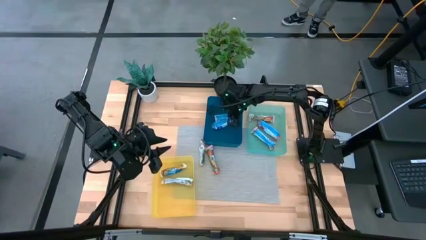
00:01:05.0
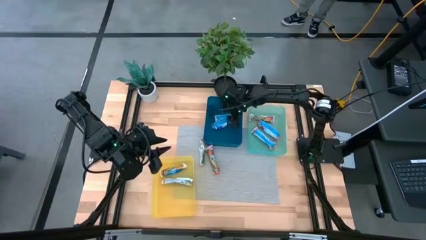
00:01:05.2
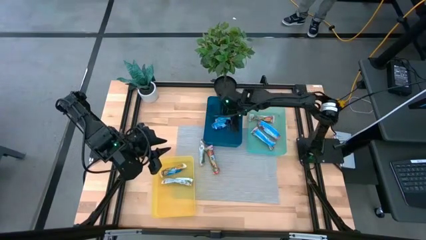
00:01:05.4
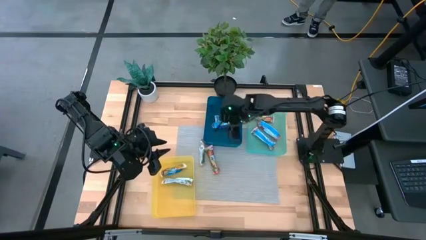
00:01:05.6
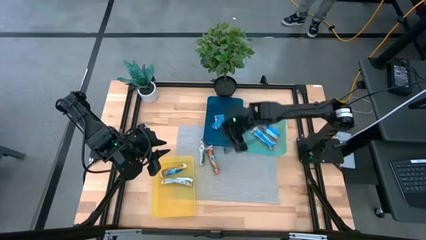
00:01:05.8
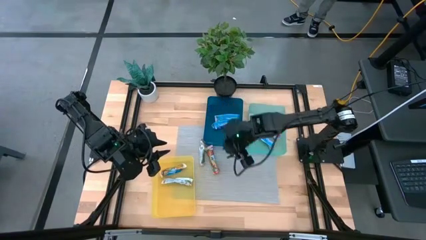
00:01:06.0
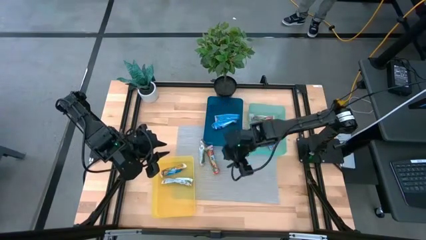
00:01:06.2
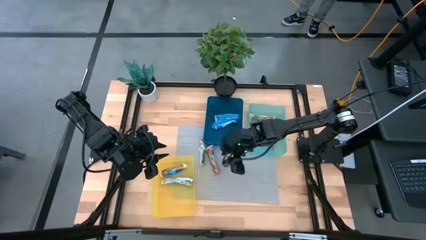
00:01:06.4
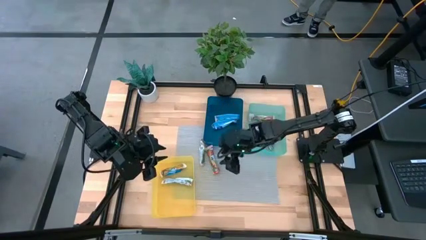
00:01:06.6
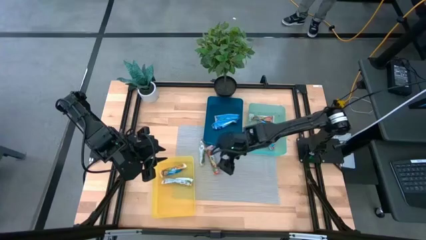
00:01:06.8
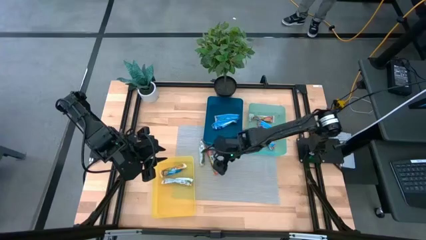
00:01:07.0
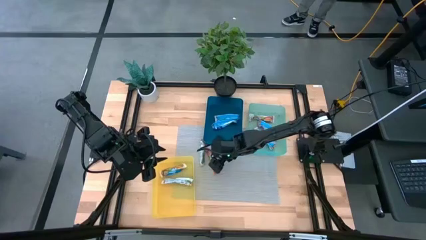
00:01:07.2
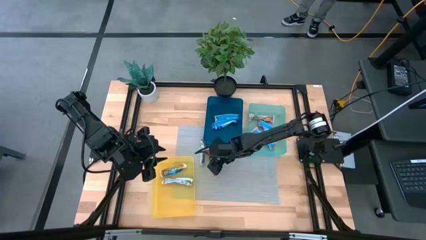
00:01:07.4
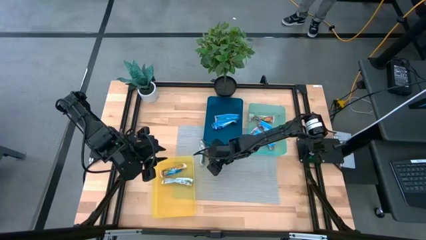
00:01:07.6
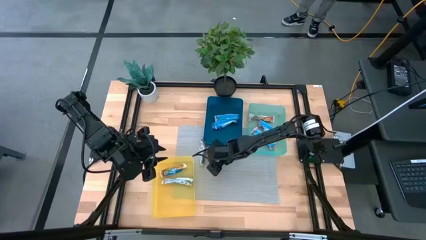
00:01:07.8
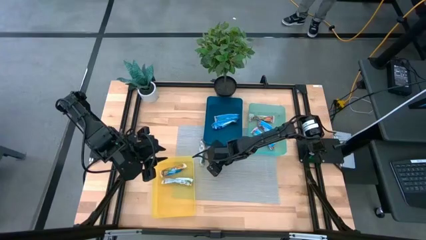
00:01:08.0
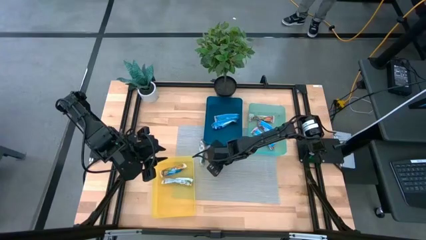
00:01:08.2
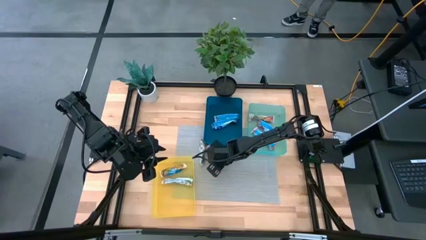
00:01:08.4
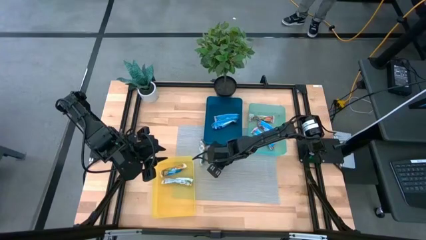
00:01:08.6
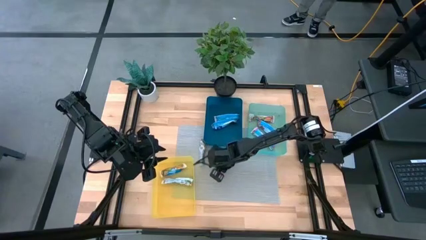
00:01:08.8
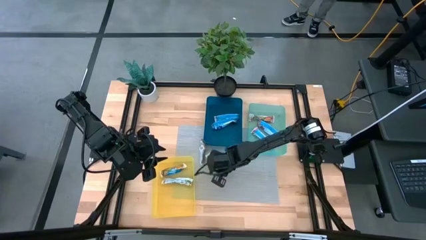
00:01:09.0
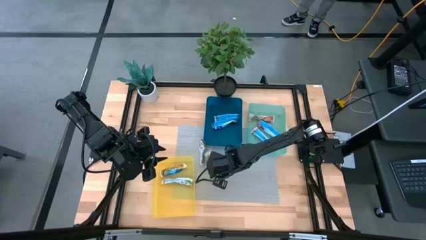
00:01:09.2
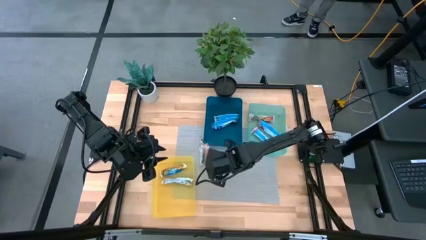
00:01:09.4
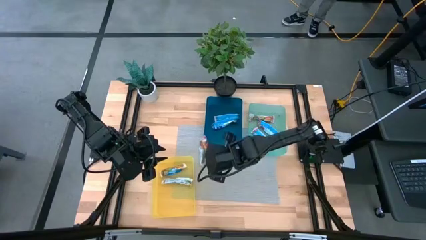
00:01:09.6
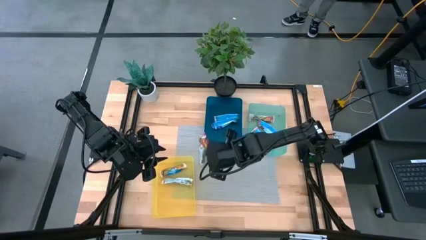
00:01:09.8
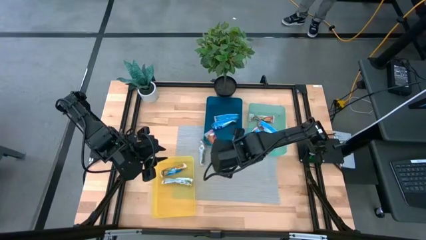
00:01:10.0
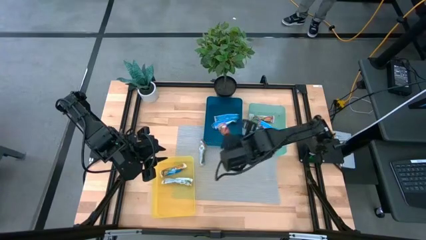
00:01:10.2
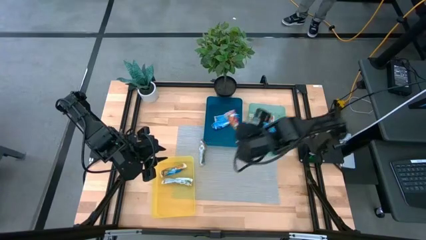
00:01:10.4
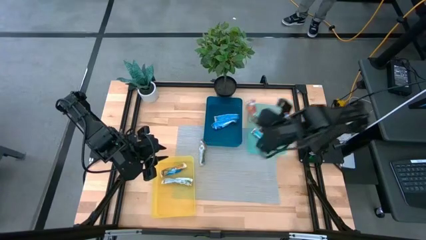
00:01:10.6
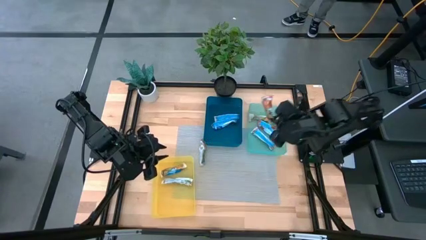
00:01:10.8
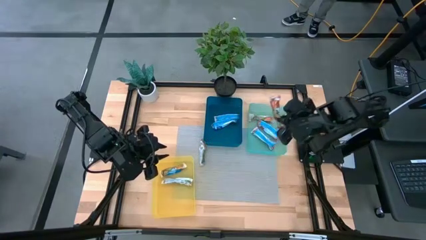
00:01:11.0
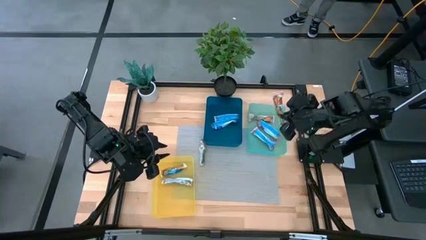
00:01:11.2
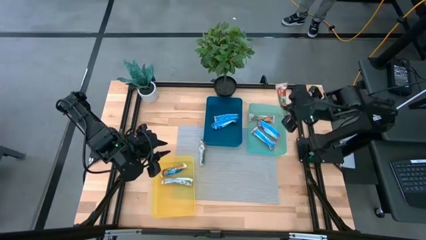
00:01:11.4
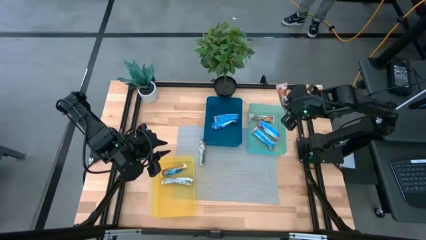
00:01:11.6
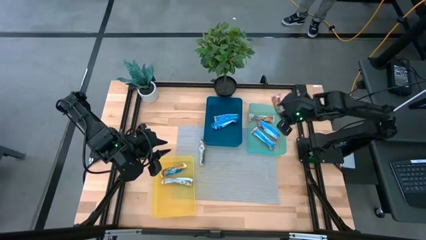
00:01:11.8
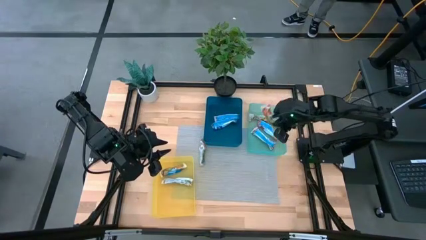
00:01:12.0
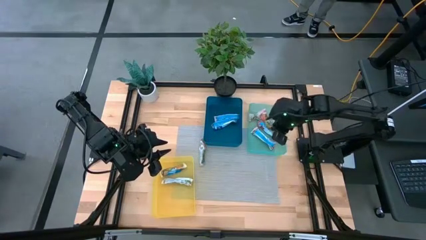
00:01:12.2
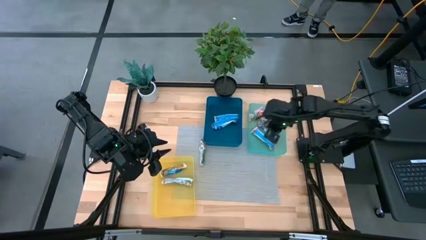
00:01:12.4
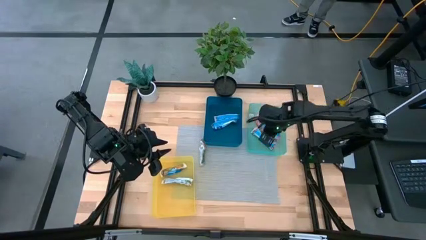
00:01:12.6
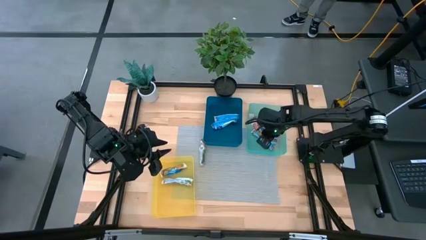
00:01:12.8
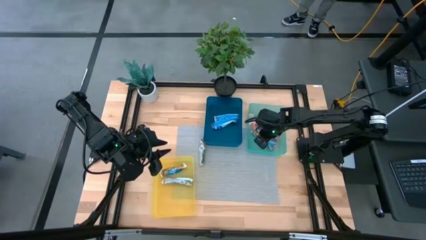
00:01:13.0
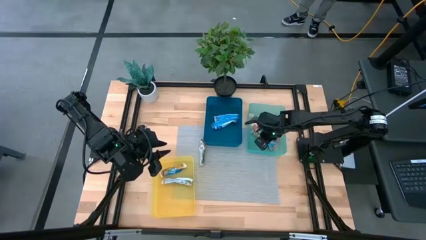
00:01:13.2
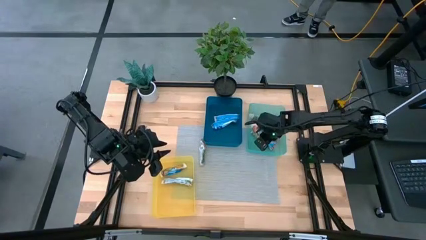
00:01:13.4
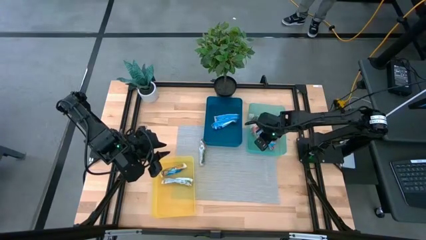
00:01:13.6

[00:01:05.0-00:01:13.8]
Task: Pick and place Granola Bars by type
Put the red granola bar into the green bin

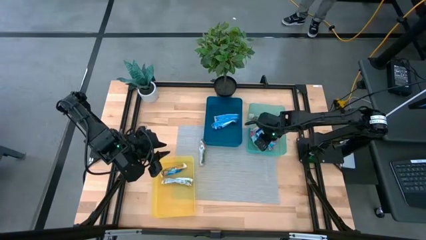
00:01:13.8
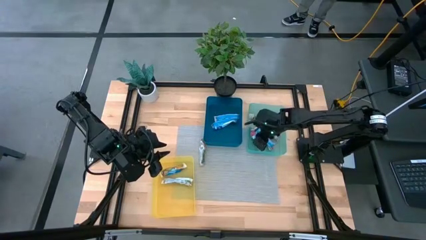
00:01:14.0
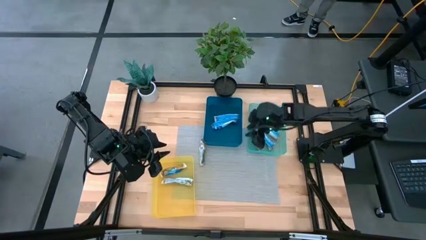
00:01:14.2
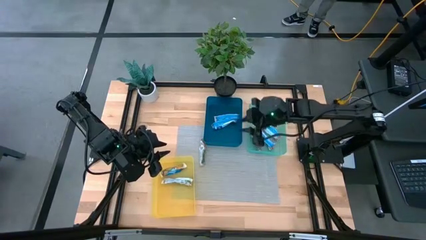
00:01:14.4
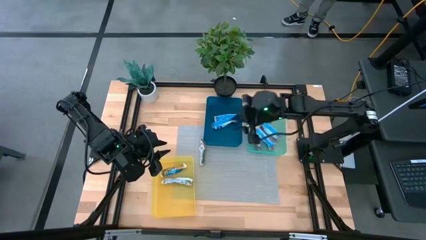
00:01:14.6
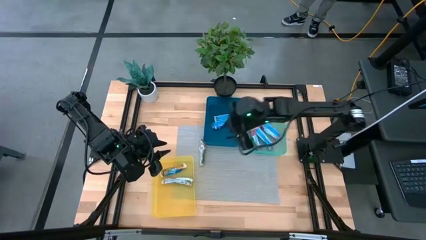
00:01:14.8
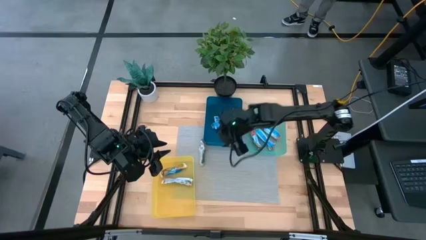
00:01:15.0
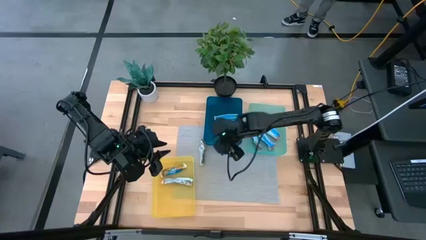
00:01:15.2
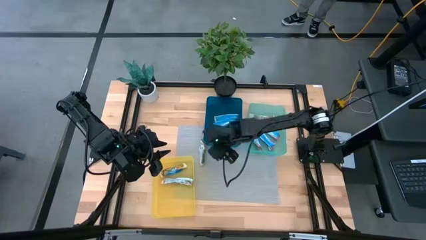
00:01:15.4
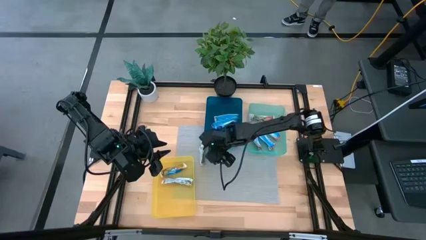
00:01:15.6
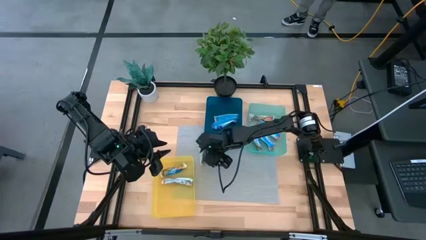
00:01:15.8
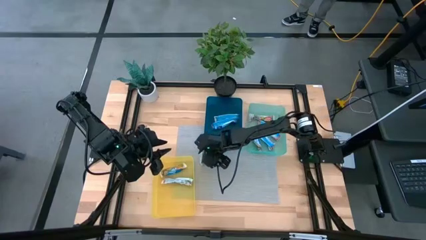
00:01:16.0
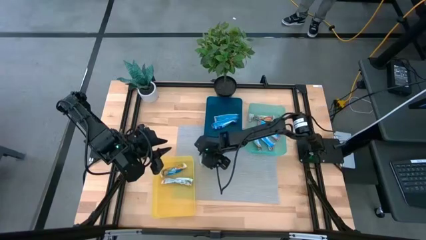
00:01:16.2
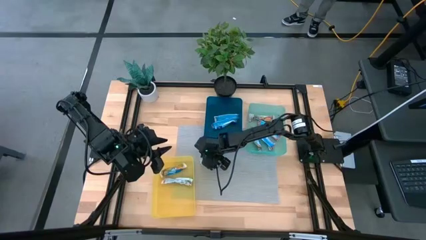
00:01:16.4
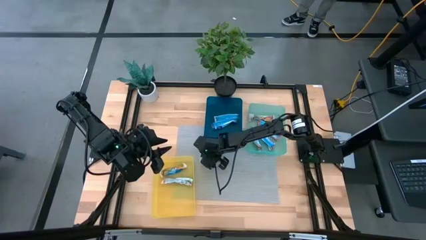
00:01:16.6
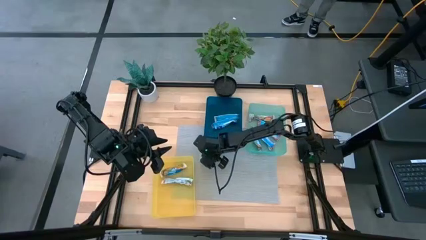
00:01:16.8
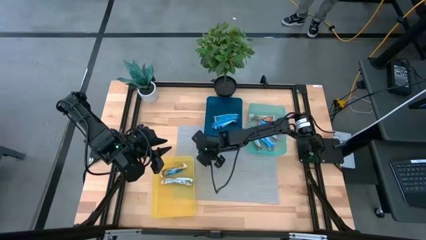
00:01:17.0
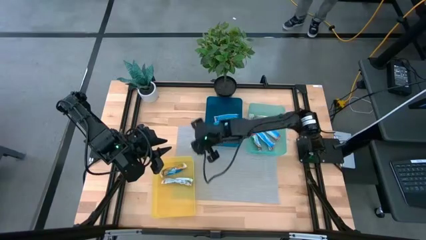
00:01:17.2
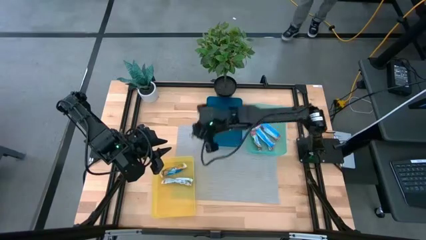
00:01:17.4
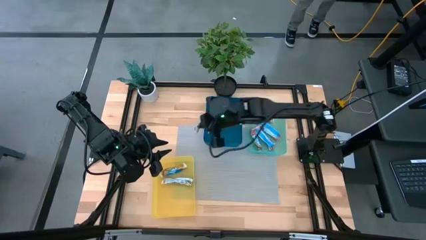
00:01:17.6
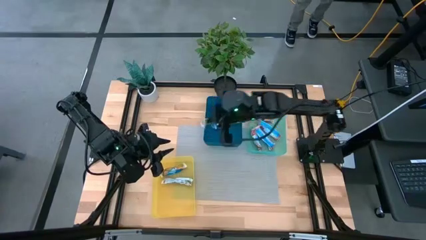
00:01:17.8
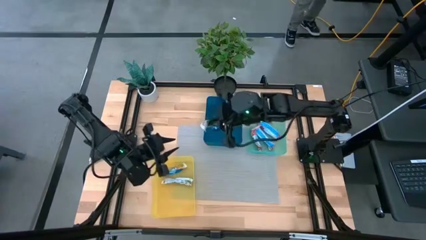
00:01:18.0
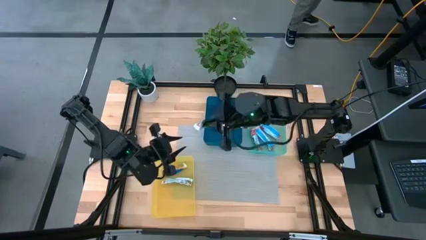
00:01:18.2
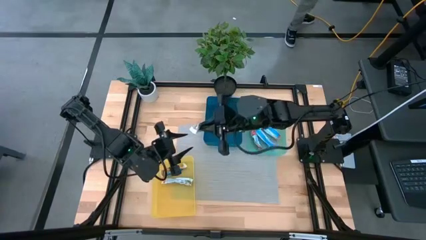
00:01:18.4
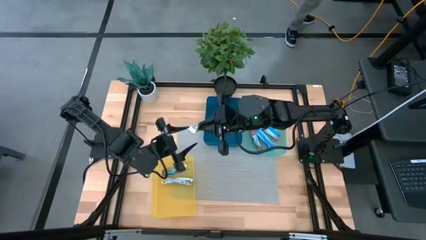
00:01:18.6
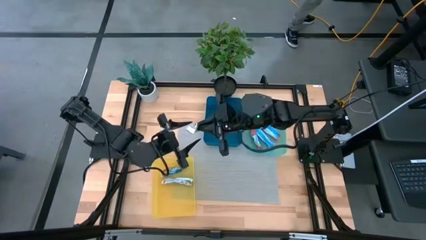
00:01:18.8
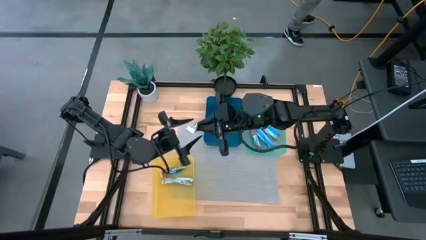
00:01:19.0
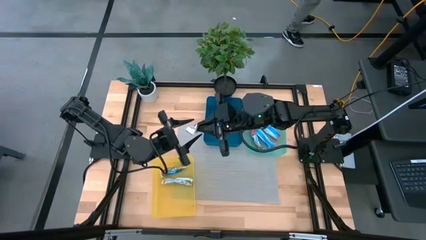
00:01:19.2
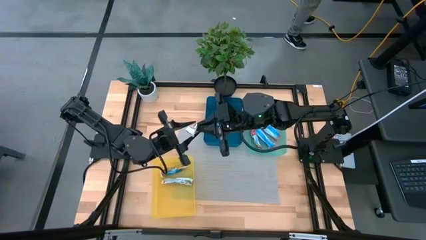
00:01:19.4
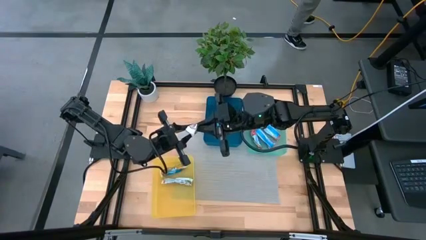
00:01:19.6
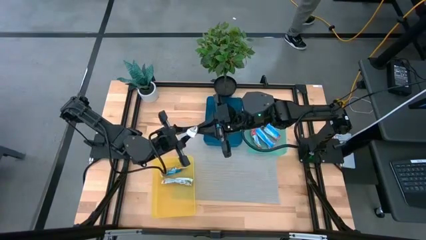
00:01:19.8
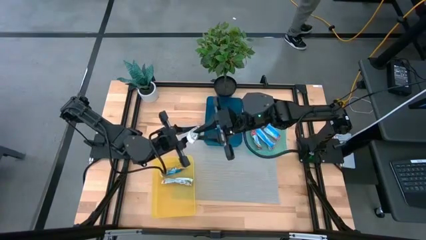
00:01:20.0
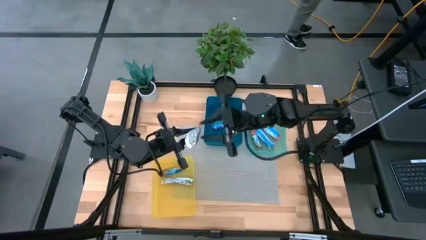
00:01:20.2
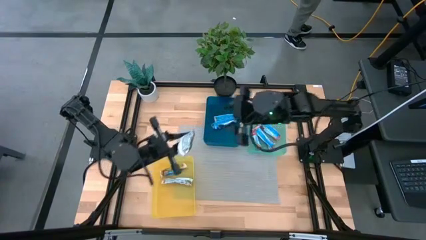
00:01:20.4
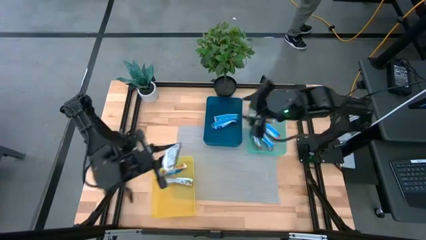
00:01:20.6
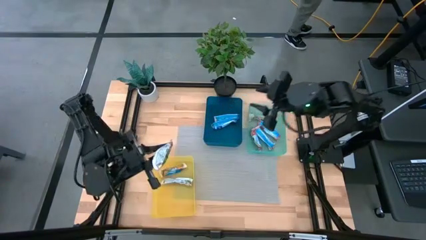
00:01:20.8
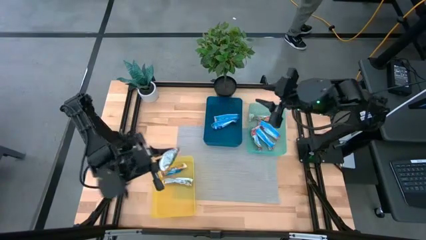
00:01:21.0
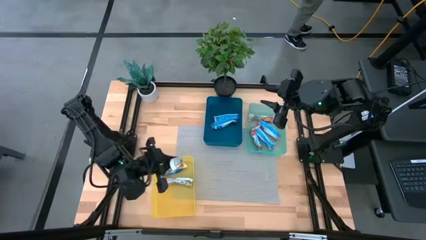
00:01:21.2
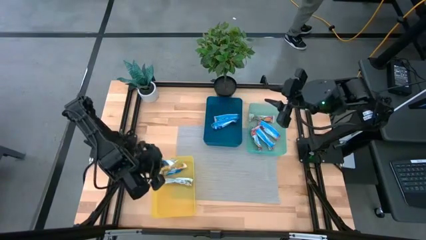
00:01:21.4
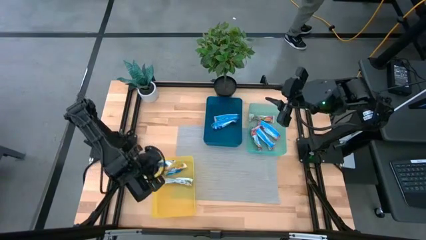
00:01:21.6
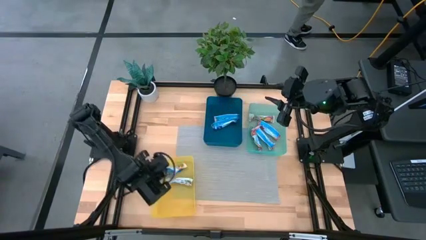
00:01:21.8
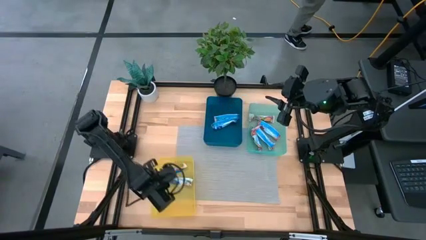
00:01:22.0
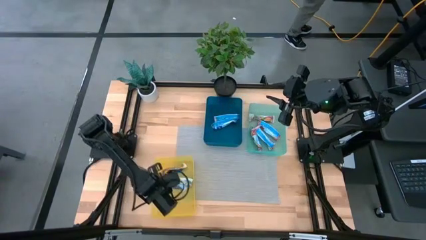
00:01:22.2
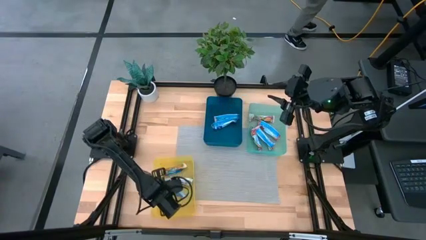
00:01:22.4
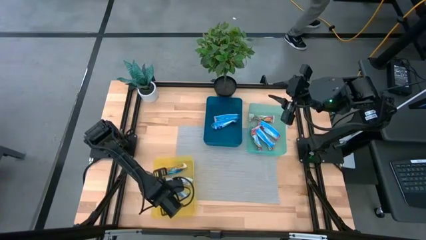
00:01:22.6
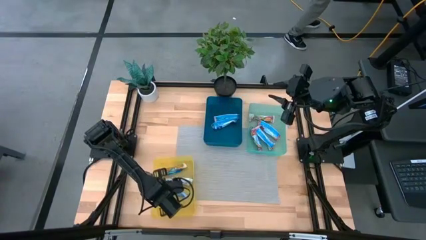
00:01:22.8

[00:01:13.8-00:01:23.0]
Put the yellow granola bar into the yellow bin
